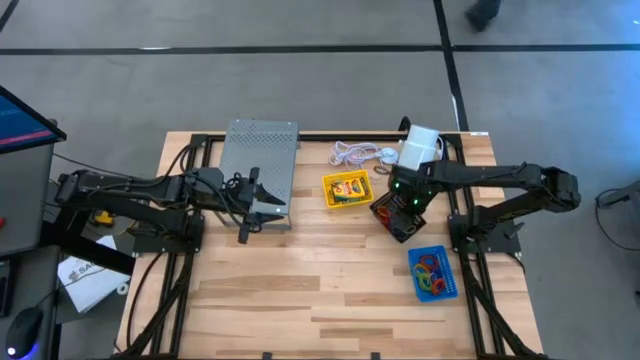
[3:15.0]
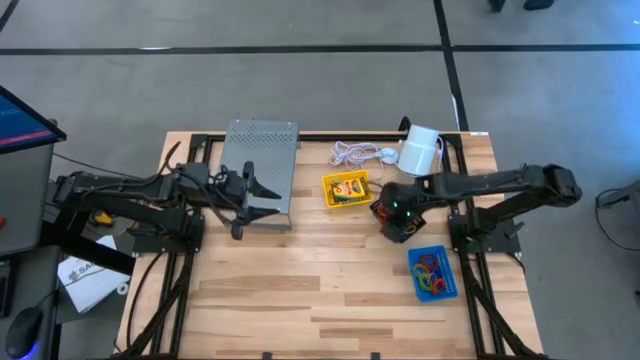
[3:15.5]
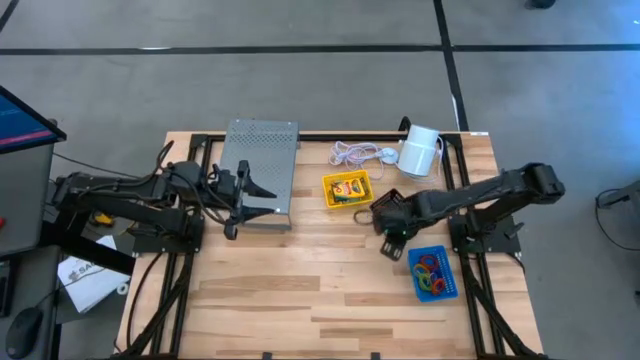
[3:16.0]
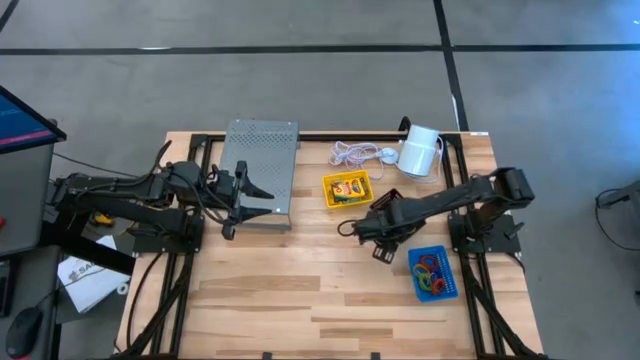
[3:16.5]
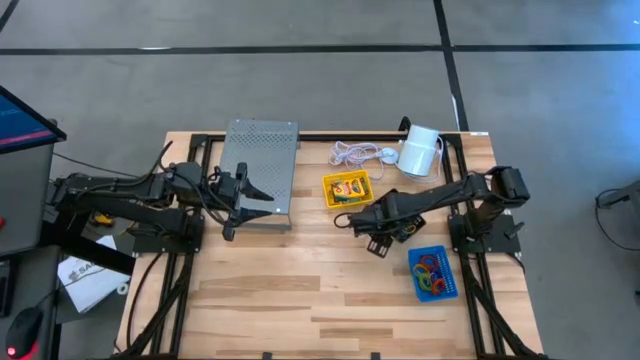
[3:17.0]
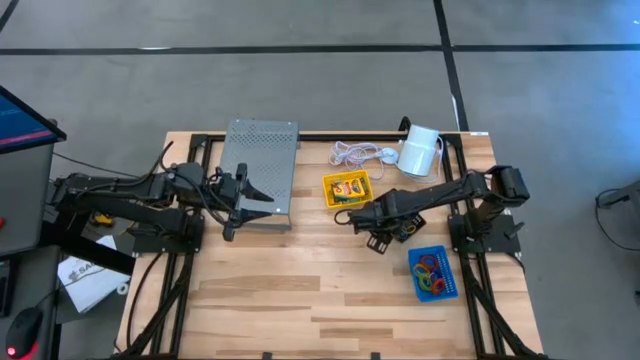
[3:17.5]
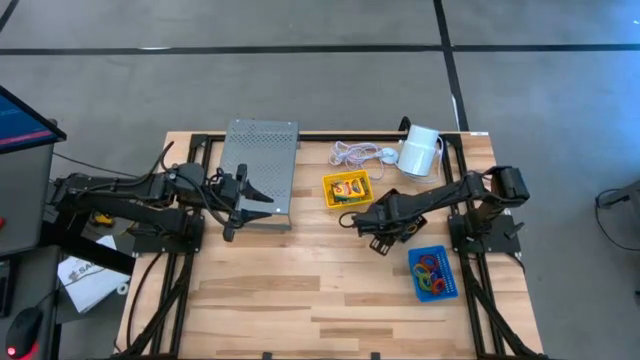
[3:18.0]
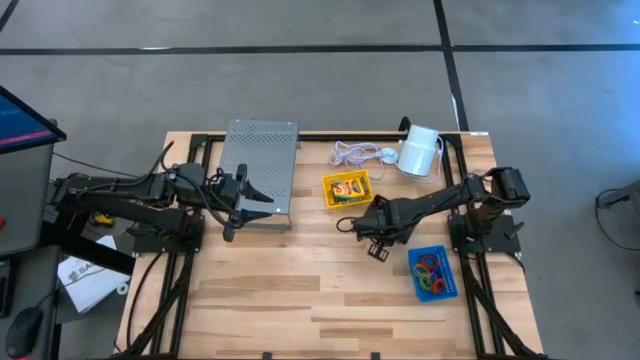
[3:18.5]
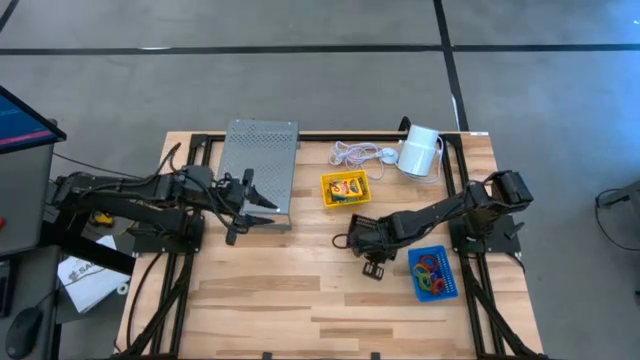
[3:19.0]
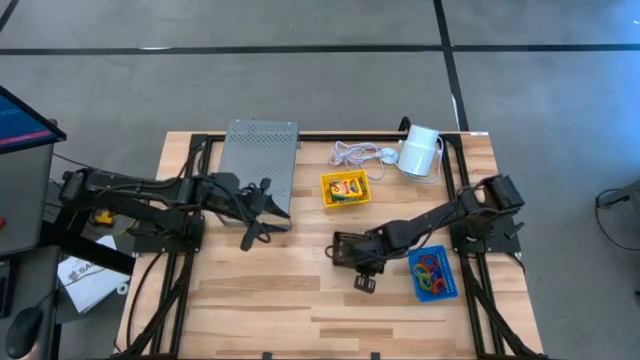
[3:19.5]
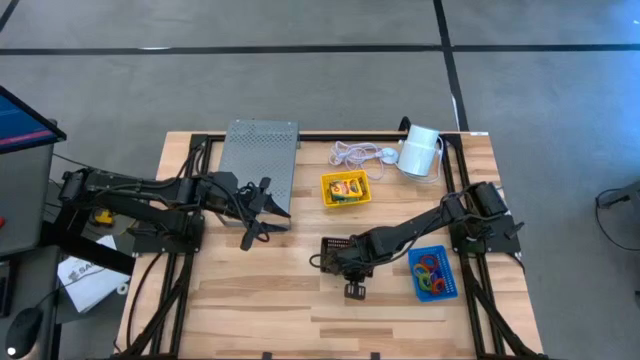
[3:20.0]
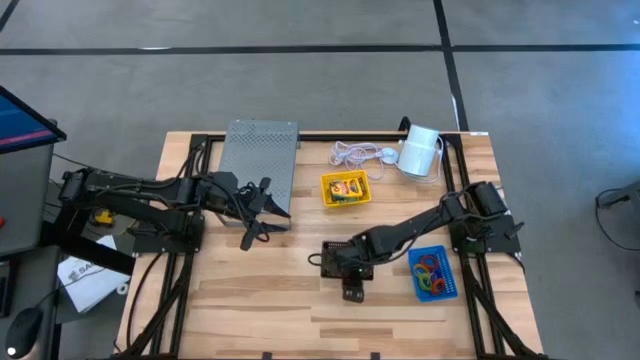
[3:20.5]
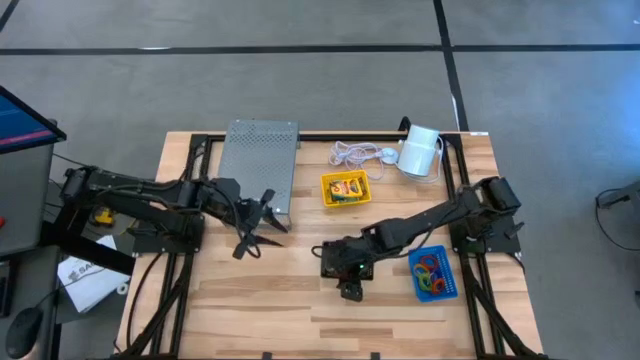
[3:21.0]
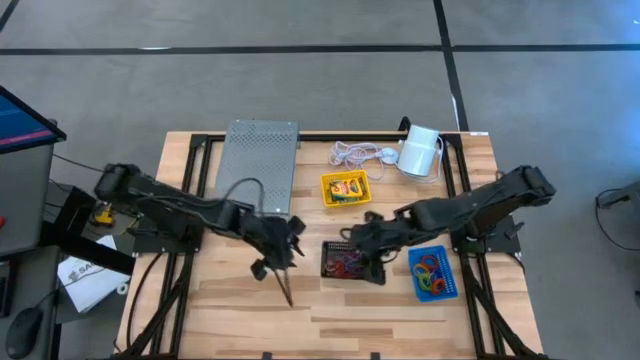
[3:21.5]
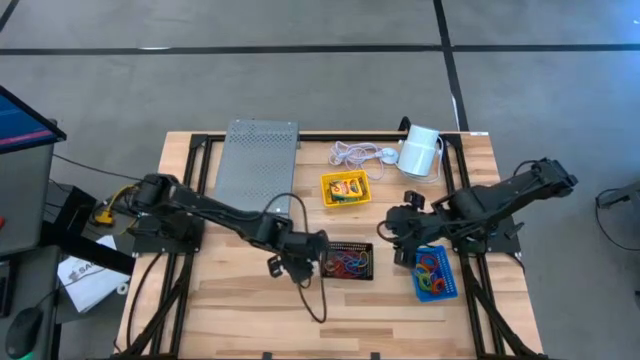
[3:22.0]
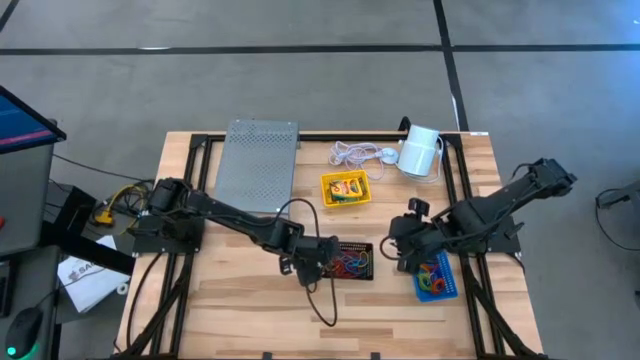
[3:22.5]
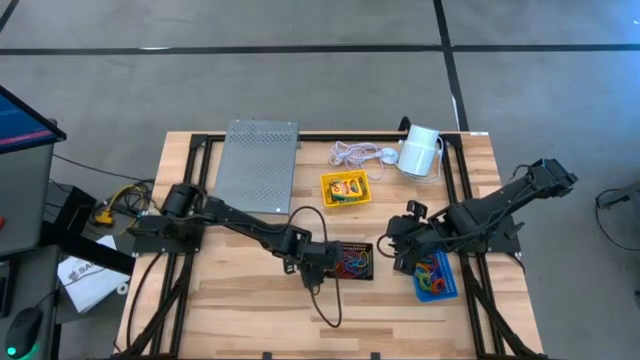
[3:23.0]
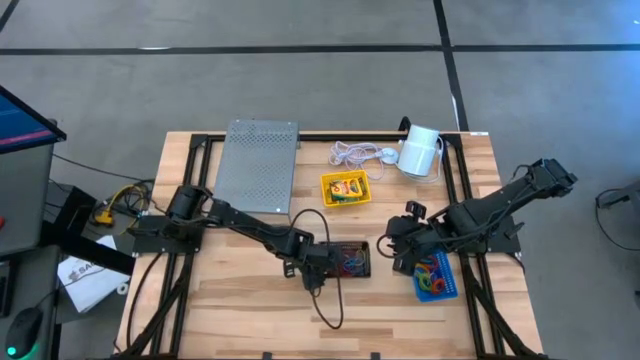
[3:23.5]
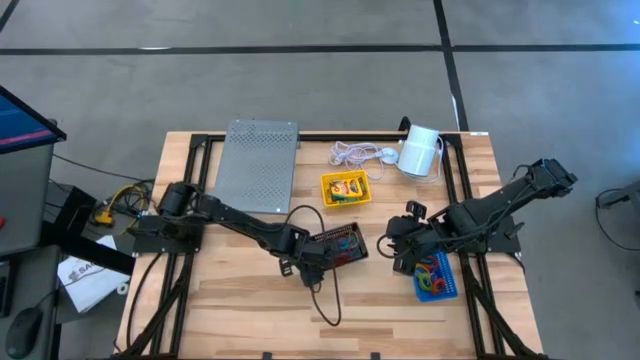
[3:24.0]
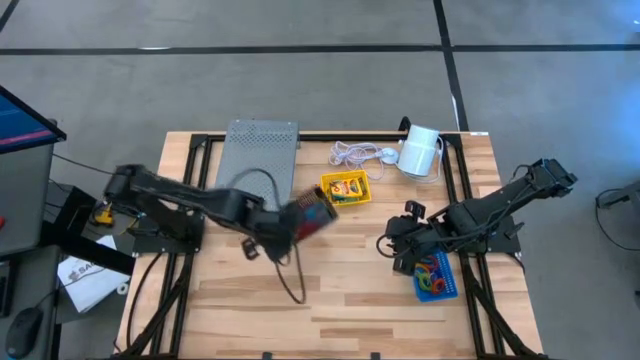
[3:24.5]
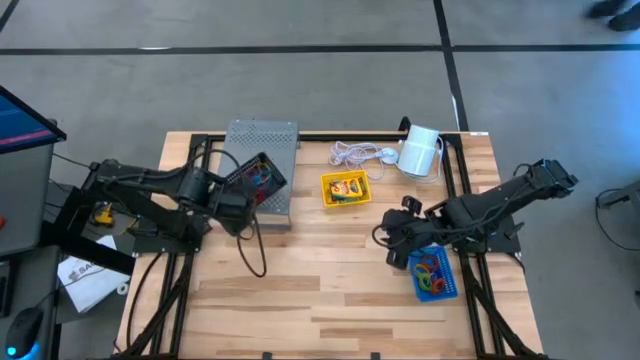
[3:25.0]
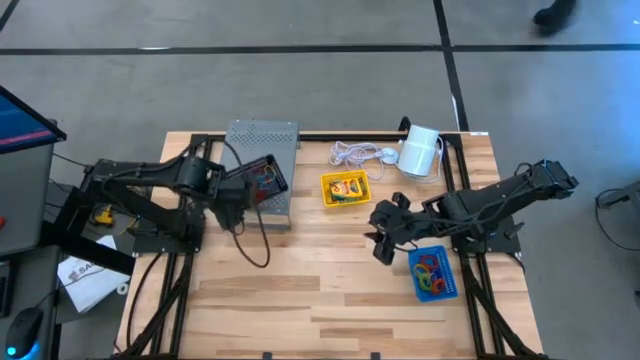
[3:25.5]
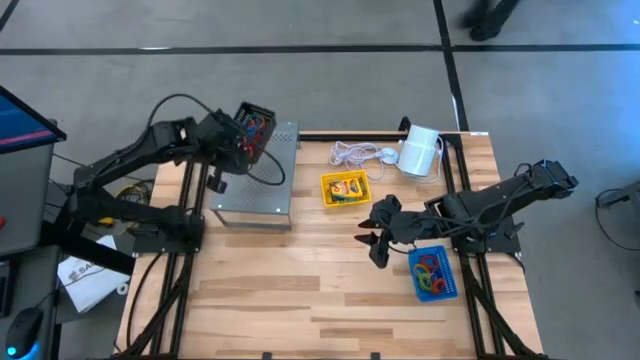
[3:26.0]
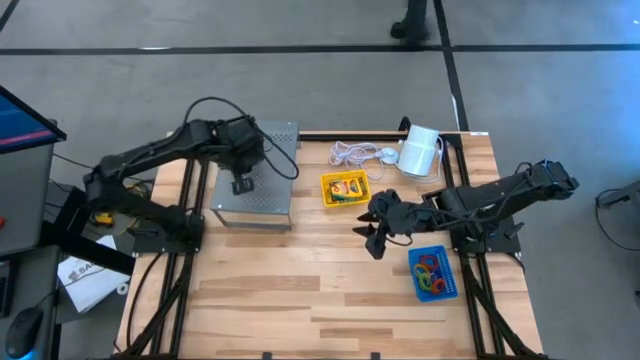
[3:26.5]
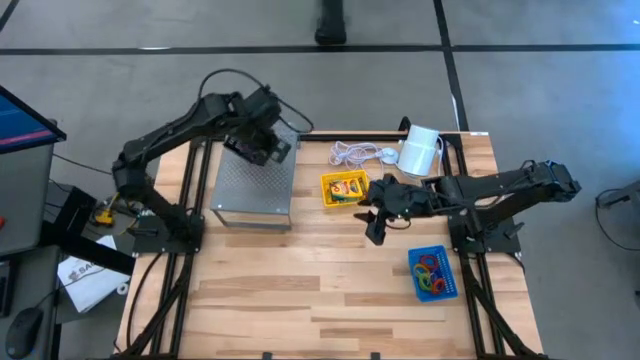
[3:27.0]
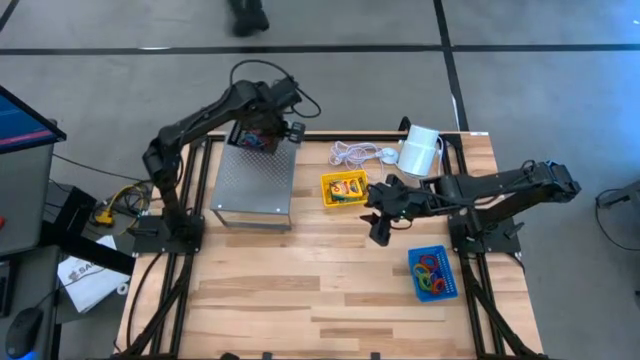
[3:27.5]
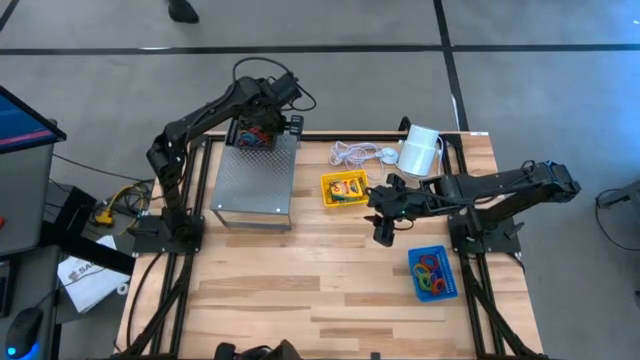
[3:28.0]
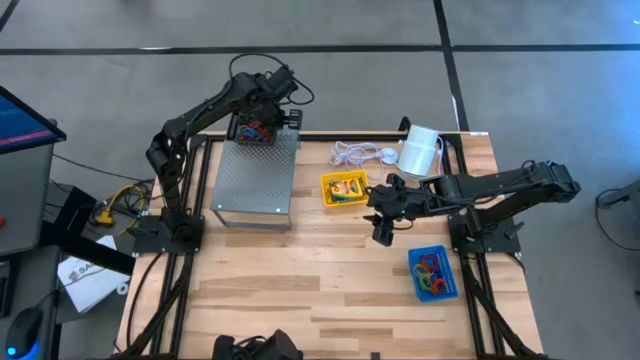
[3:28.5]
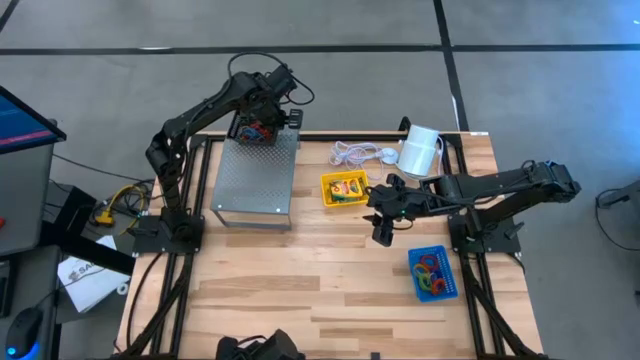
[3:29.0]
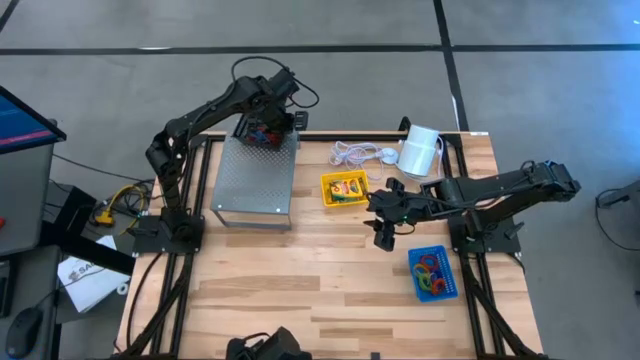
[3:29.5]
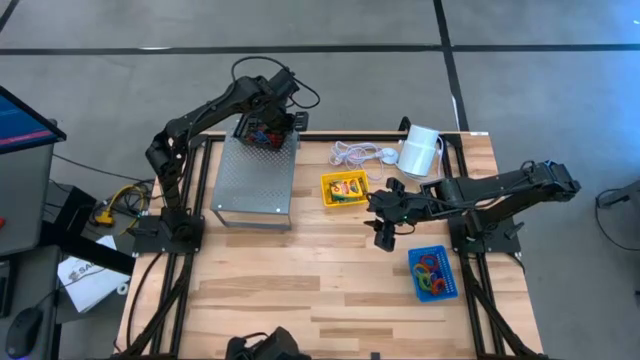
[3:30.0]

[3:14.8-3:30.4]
Task: Pick & Place Office Desk Supplies
Put the black bin with rubber bands on the shelf
